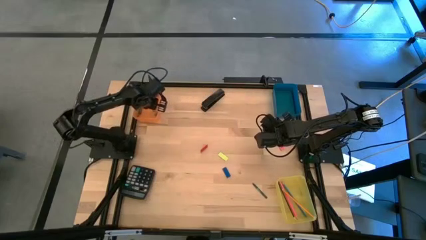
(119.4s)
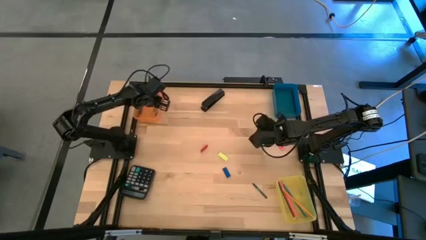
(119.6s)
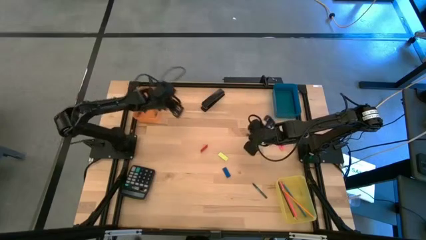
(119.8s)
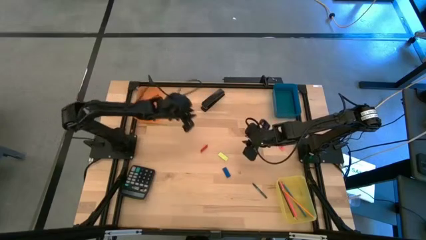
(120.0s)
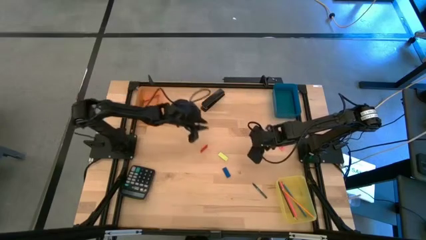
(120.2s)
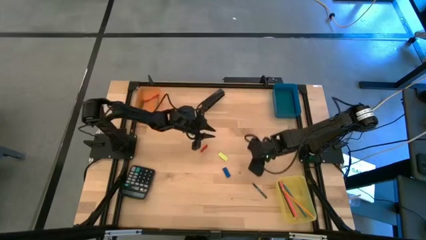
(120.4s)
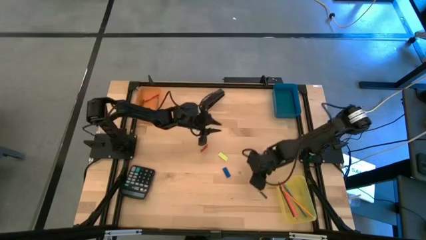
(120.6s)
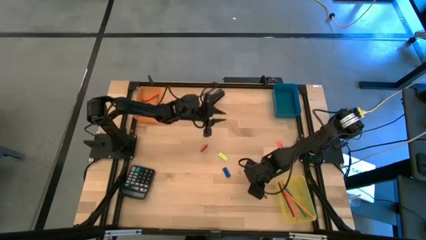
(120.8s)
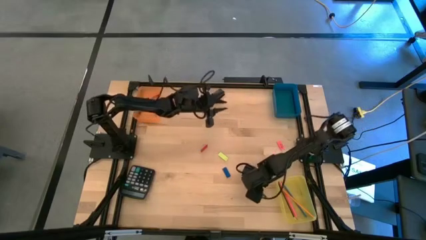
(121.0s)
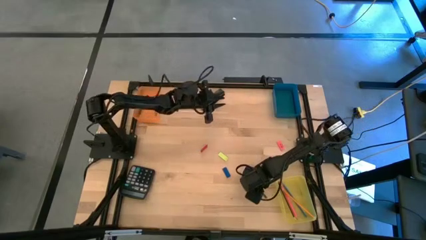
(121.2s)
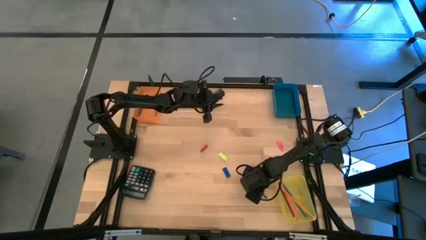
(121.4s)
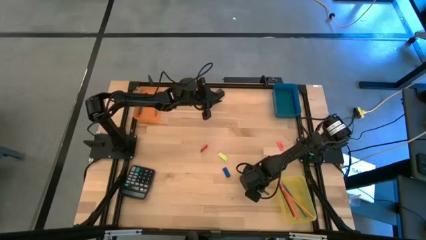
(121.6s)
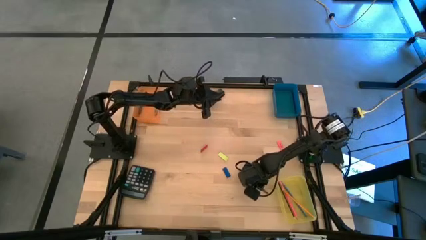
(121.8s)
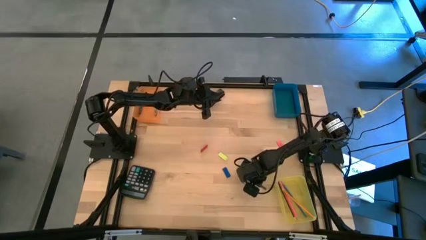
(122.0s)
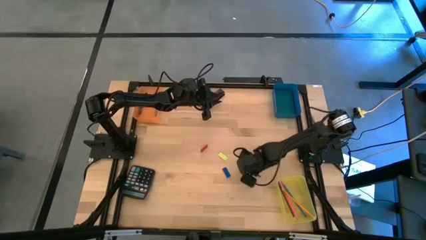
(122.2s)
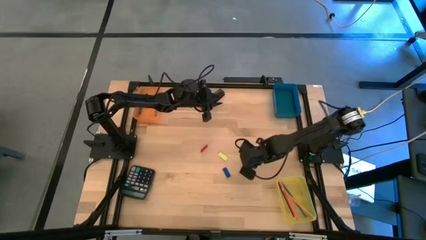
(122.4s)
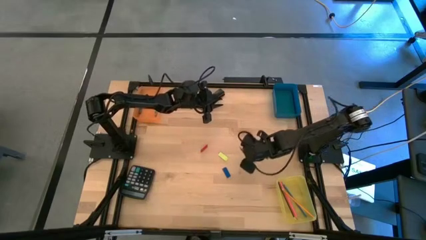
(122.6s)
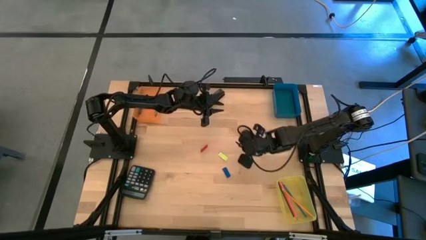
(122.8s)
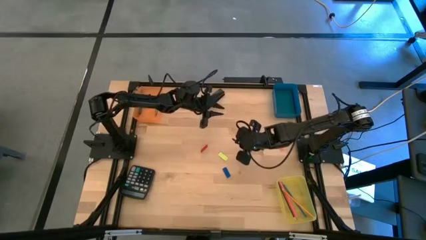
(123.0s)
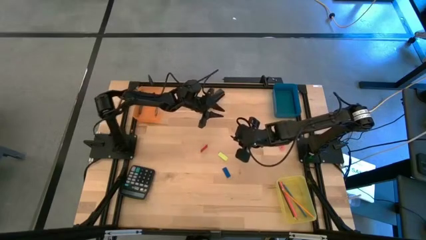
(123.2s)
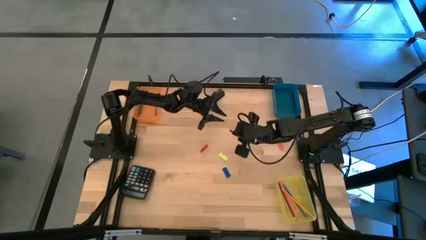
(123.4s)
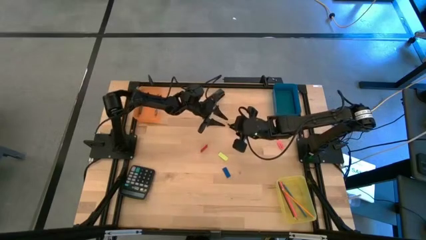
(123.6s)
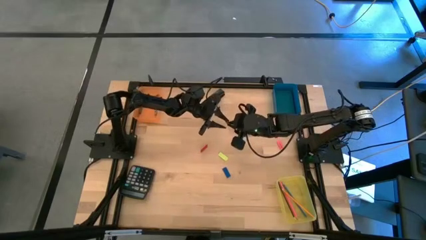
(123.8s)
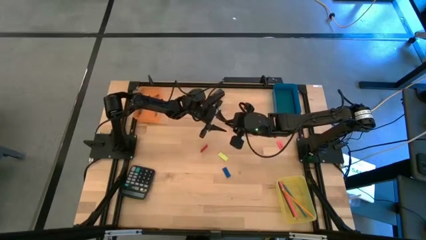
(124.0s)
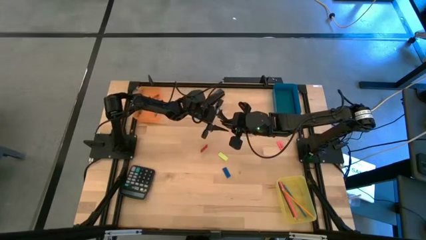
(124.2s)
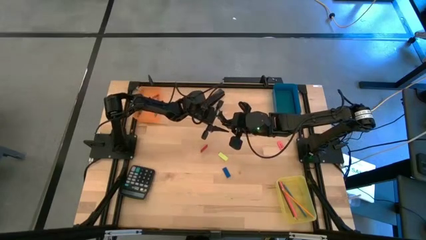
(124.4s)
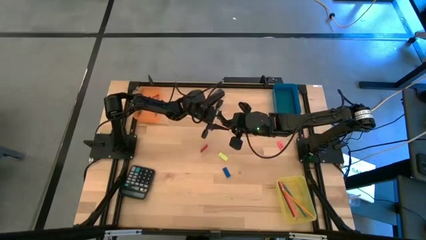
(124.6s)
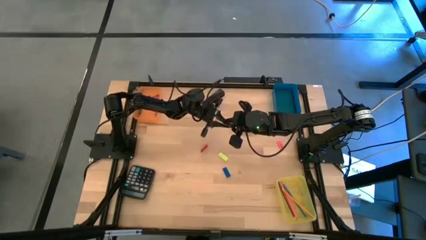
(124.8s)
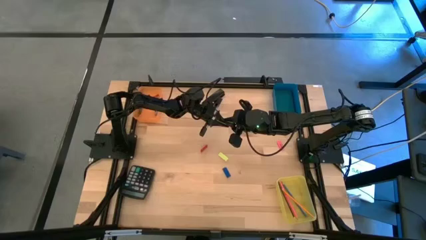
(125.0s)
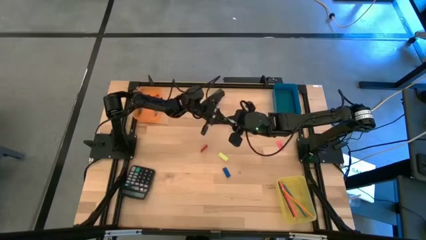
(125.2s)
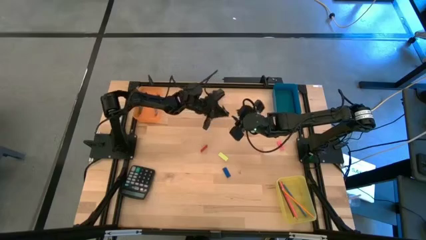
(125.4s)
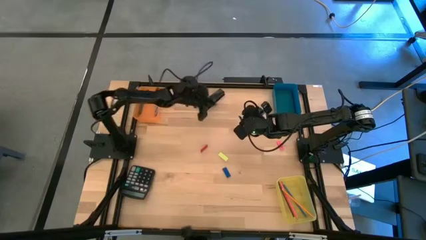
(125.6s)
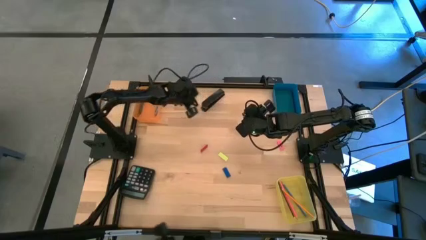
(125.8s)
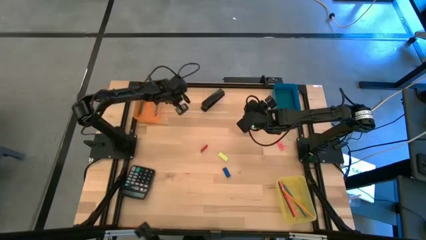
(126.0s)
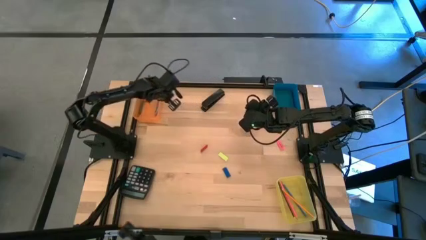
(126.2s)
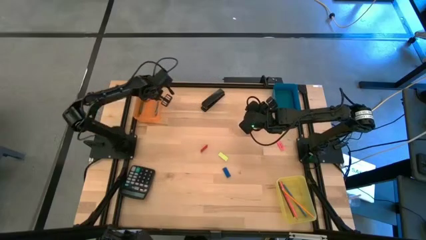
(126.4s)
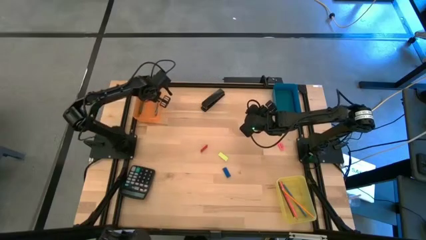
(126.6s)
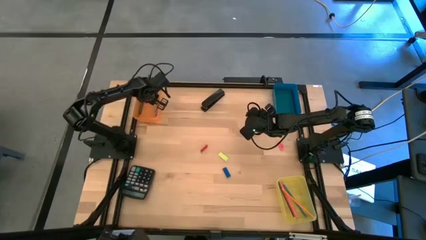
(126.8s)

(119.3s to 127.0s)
Task: Sort crayons/erasers/pens/pencils in bins
Put the green crayon into the orange bin

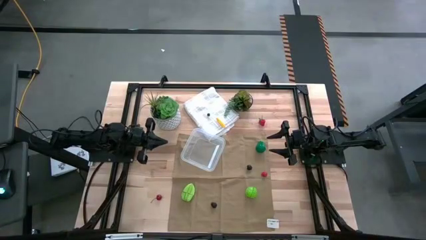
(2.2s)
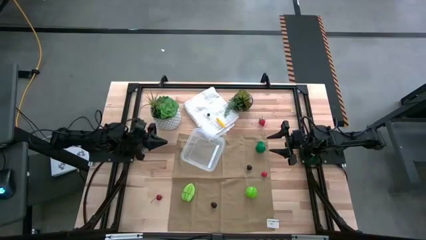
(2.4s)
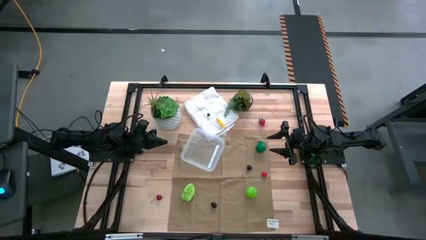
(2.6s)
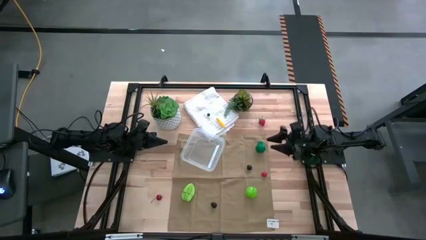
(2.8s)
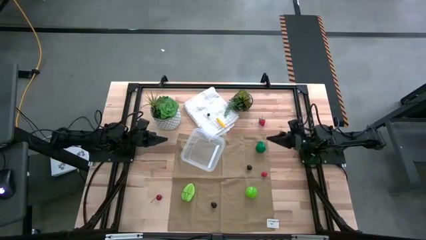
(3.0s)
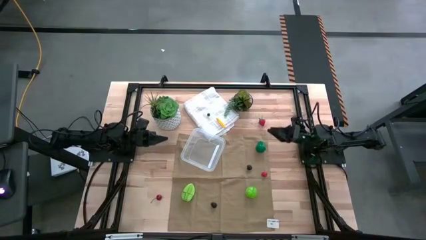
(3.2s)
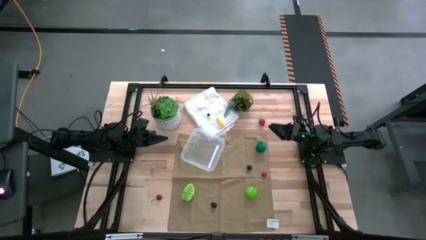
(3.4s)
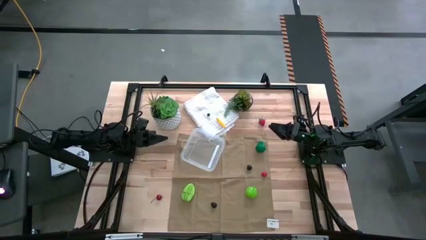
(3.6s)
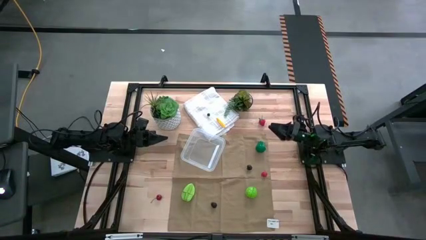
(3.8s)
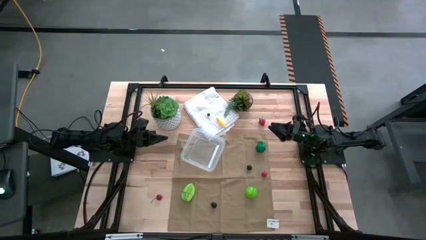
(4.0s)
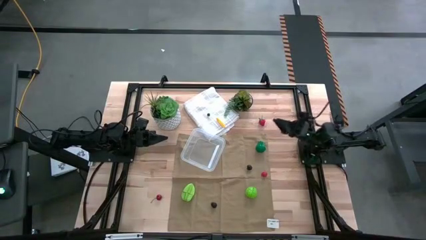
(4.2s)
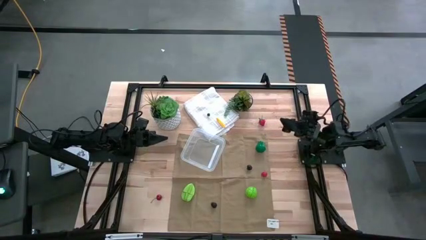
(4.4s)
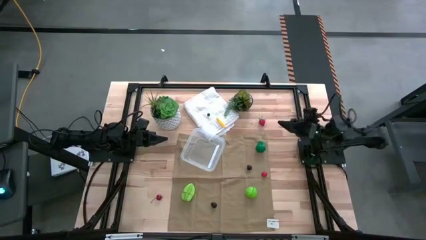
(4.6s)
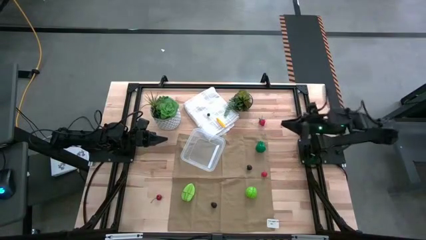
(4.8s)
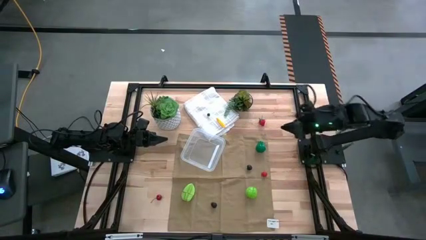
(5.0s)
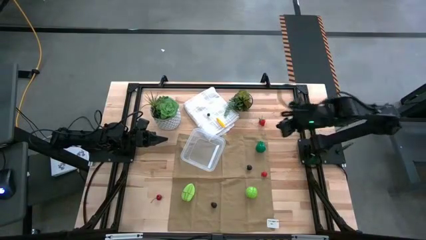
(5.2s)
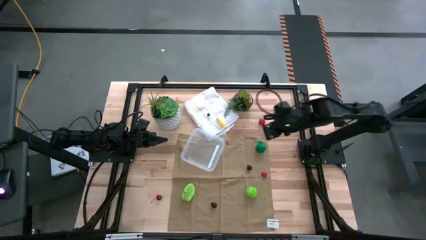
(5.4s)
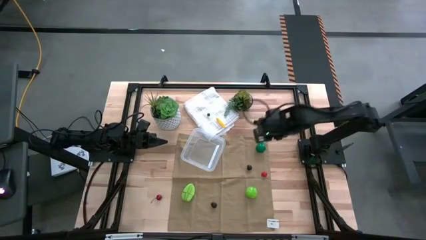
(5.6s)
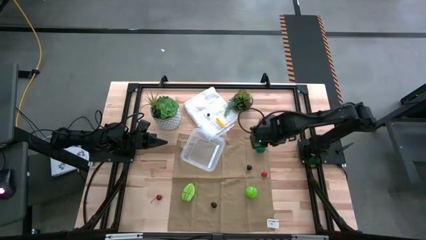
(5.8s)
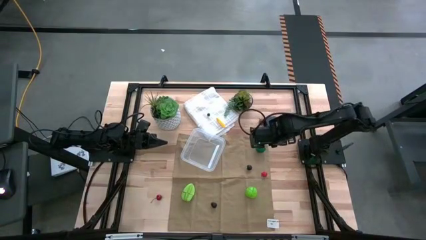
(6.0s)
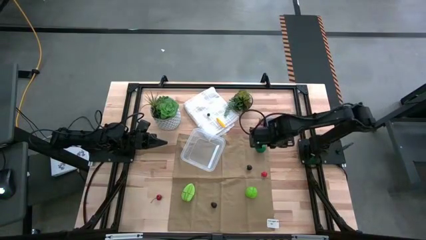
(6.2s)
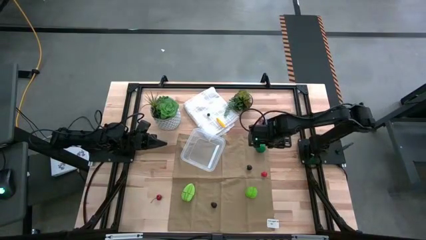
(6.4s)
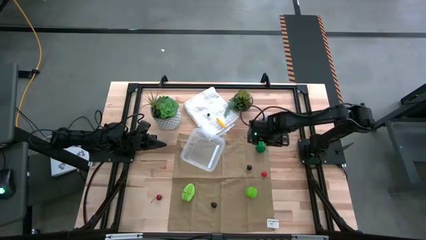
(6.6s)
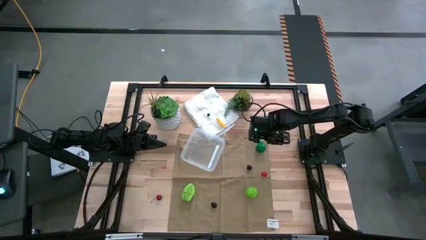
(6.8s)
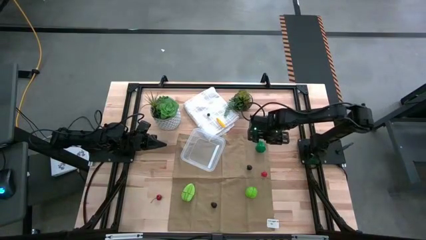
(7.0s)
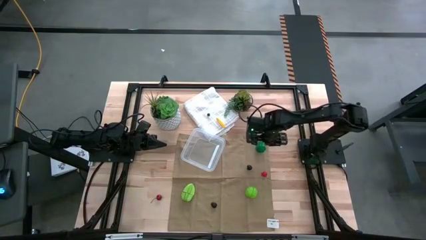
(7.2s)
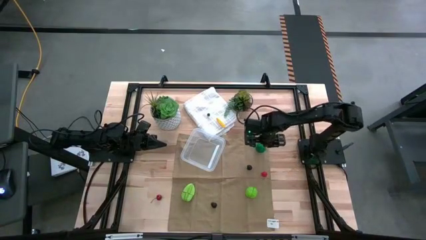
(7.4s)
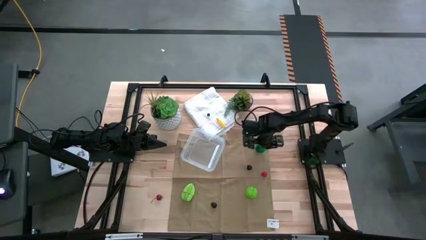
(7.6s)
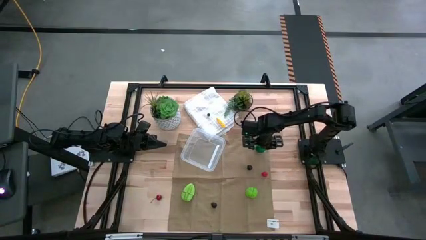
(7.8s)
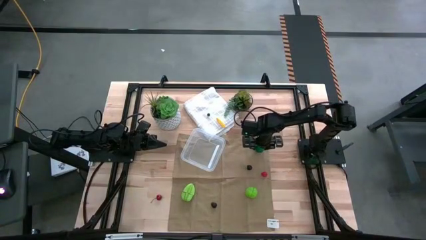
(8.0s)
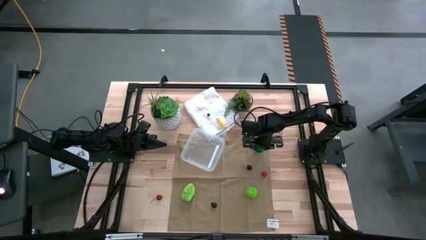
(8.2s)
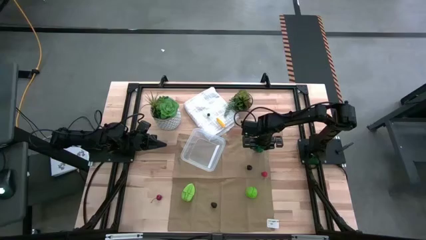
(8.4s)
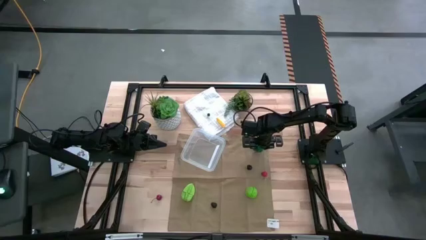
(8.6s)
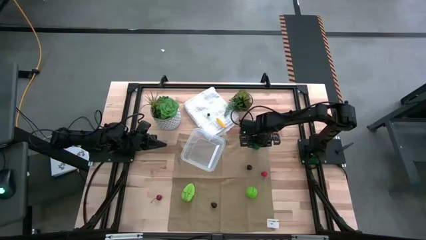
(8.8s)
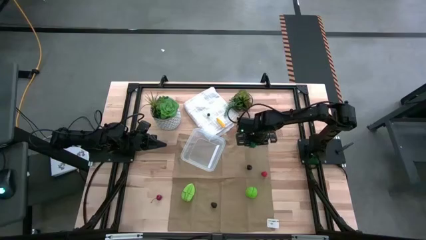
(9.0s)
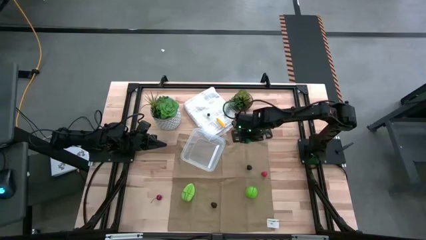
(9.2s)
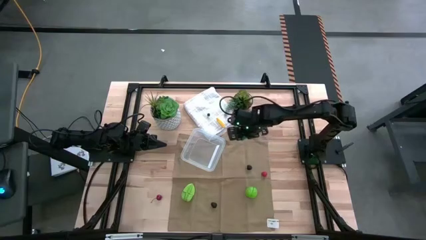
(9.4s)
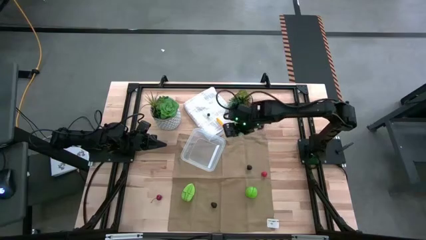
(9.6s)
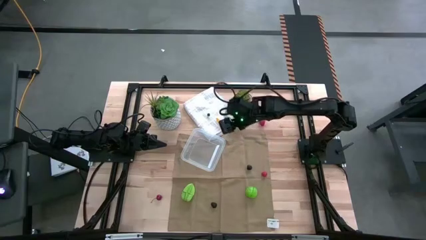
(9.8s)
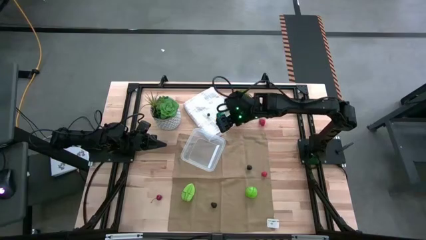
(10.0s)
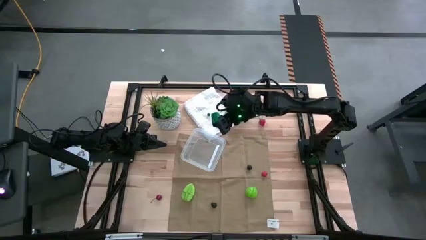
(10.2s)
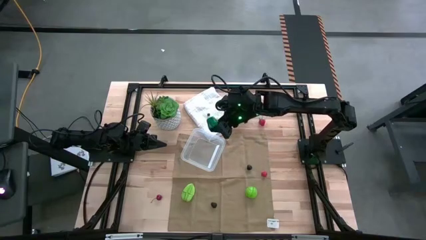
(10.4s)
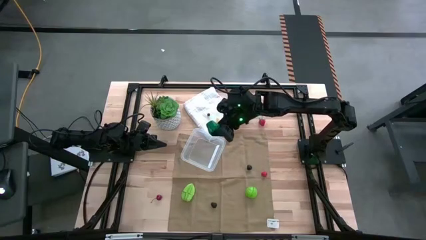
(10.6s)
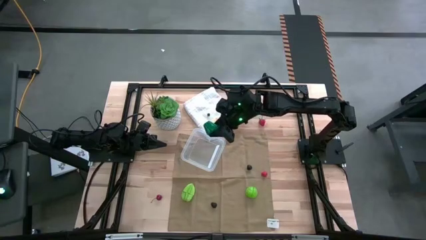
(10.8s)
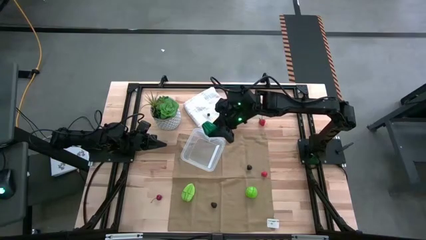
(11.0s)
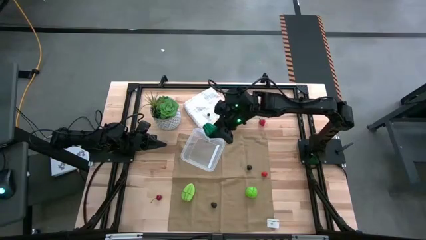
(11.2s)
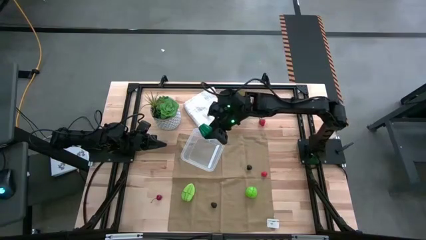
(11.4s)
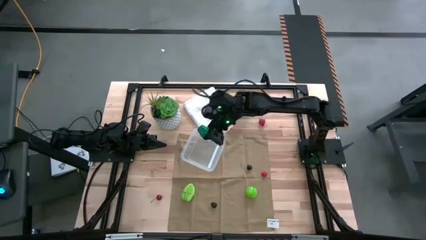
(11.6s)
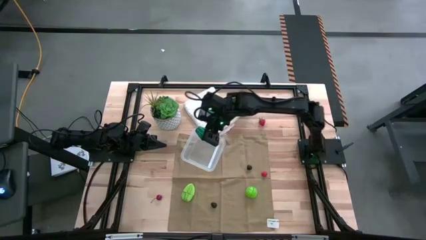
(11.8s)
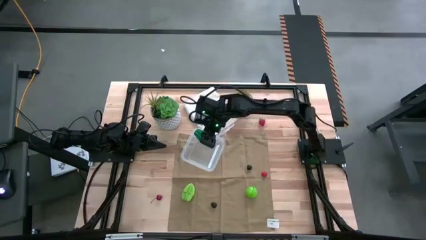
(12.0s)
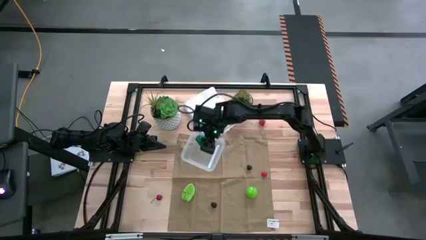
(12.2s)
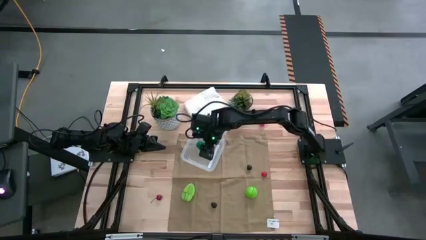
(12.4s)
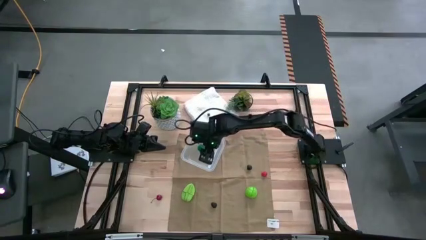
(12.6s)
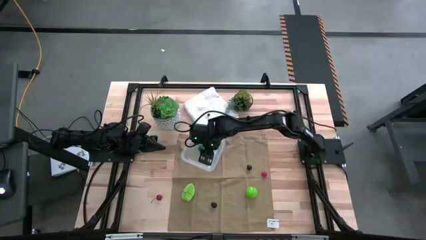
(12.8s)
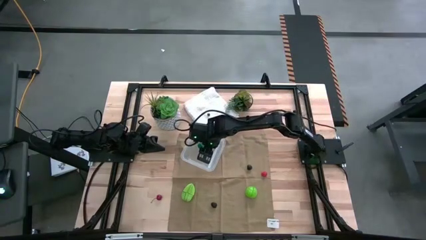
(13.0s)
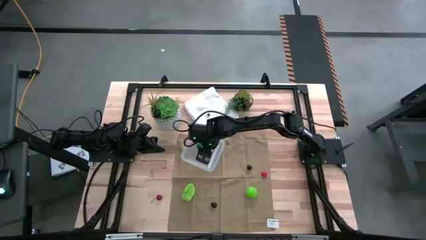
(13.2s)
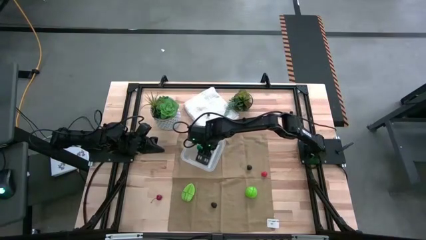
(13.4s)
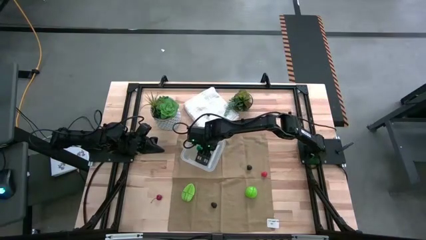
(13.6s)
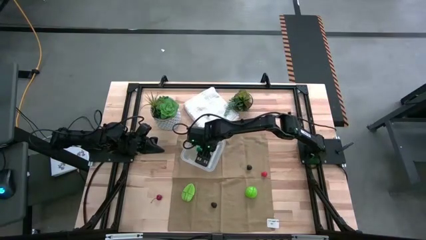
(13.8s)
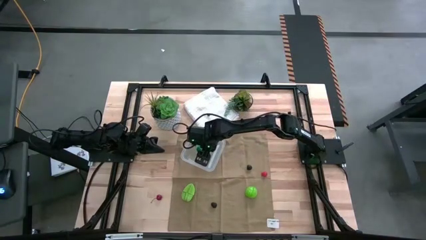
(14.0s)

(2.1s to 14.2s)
Task: Pick and placing Produce into tupperware
Put the green bell pepper into transparent bin
